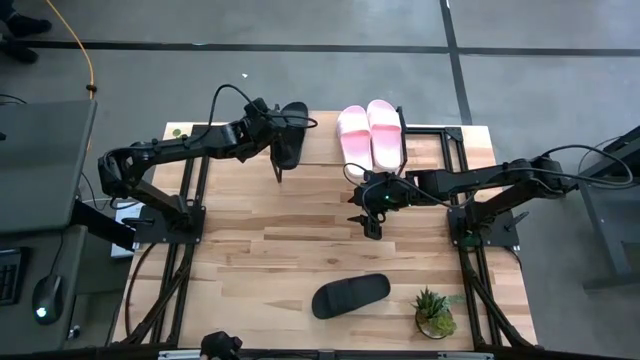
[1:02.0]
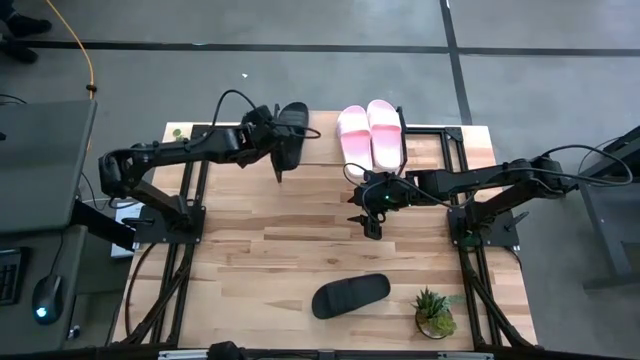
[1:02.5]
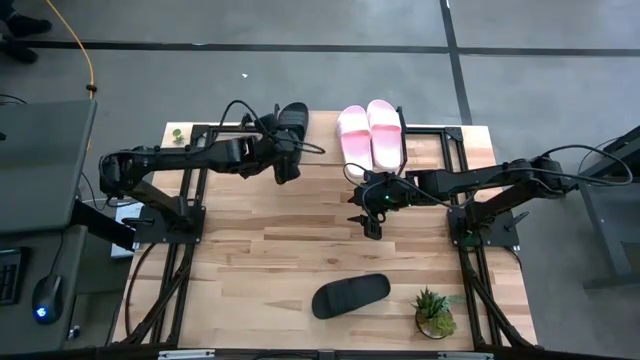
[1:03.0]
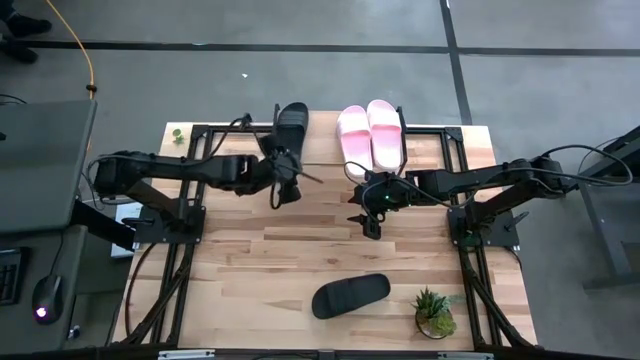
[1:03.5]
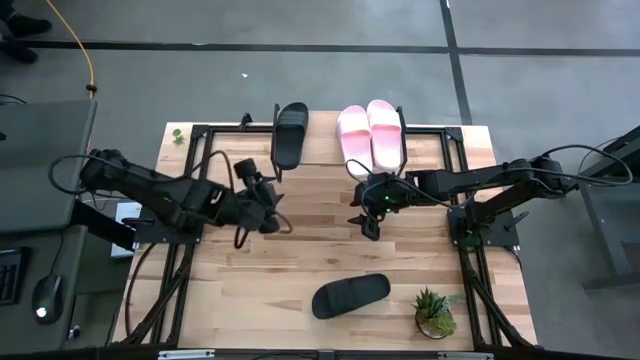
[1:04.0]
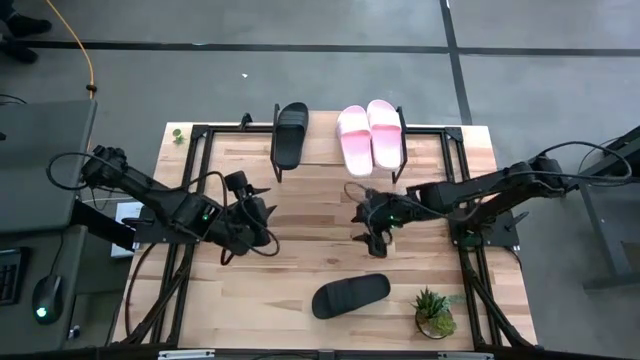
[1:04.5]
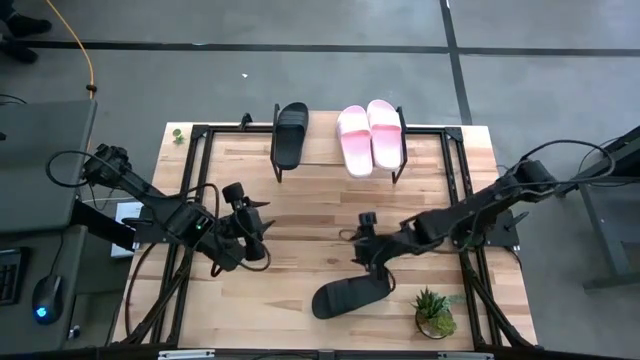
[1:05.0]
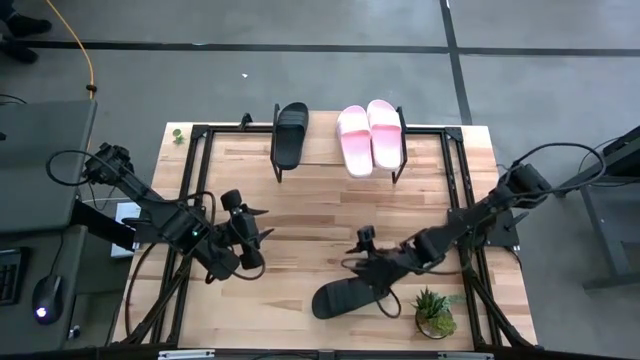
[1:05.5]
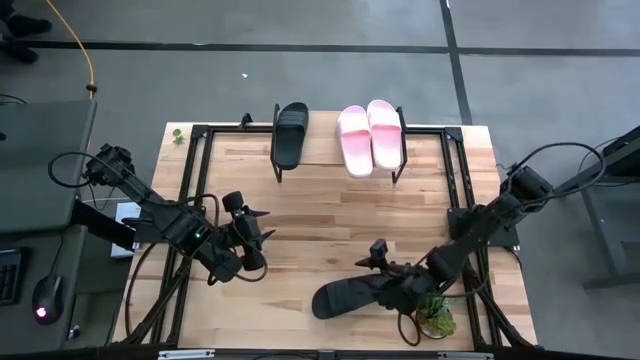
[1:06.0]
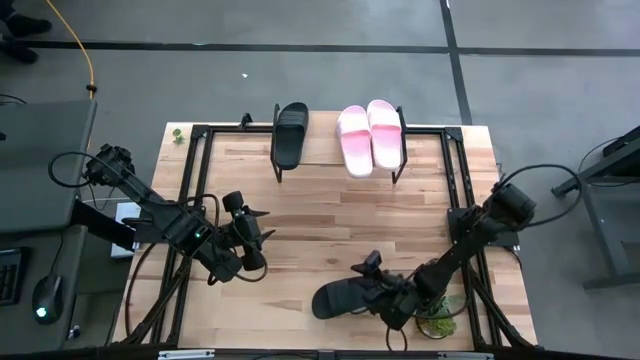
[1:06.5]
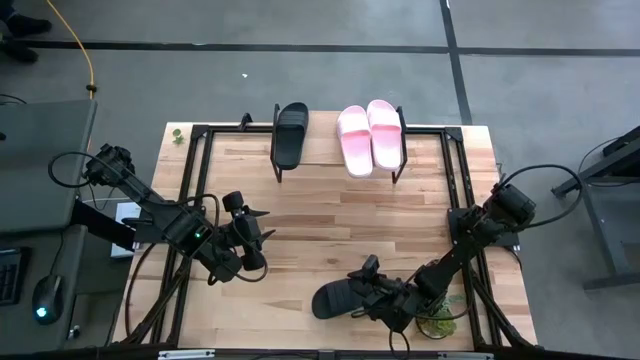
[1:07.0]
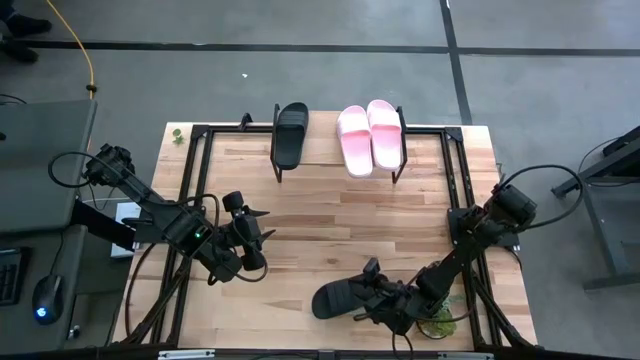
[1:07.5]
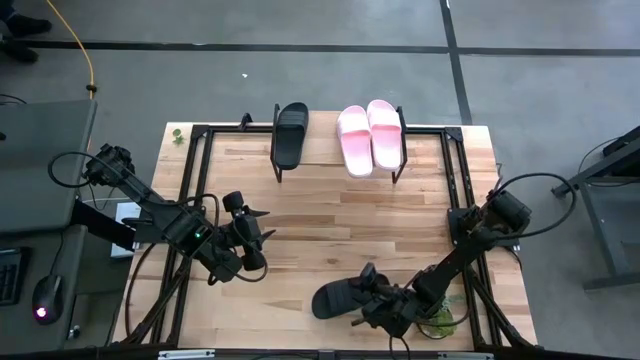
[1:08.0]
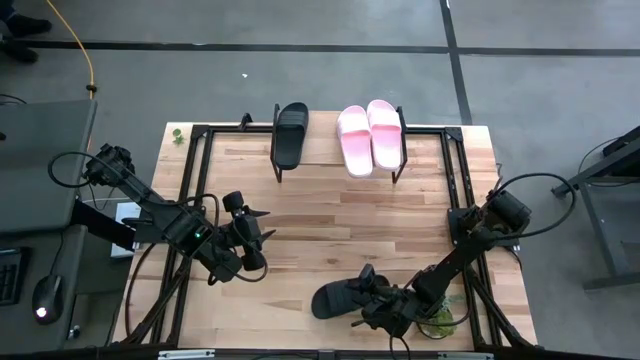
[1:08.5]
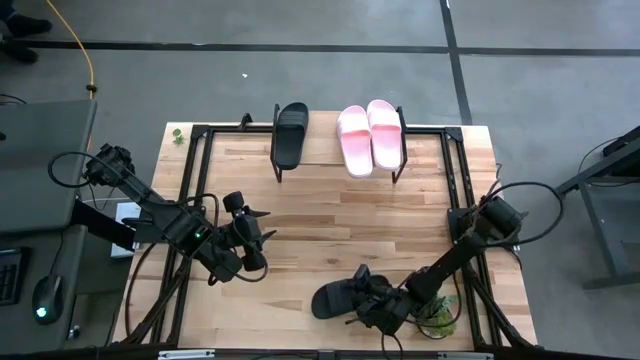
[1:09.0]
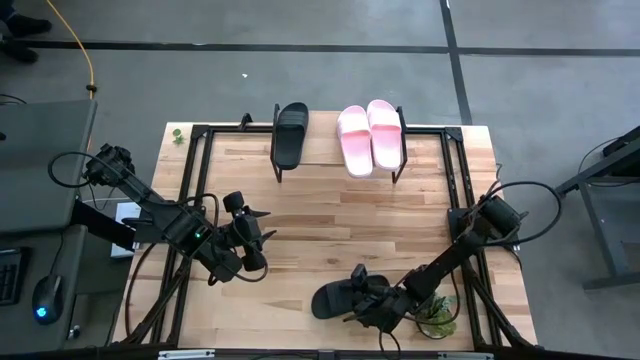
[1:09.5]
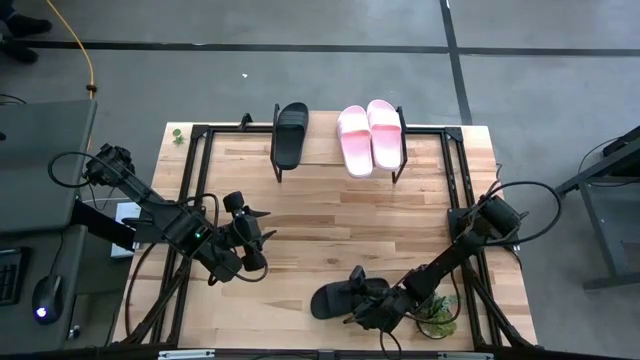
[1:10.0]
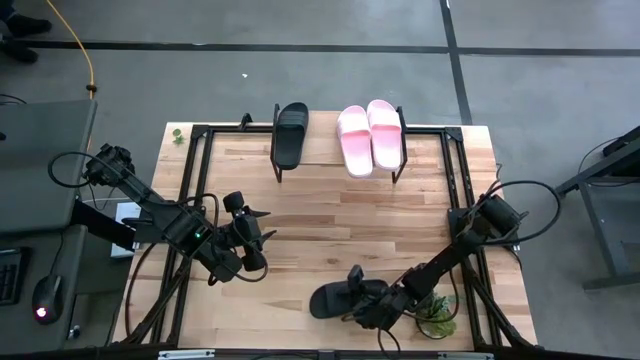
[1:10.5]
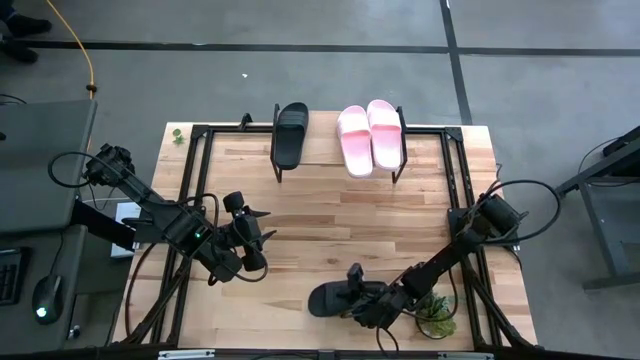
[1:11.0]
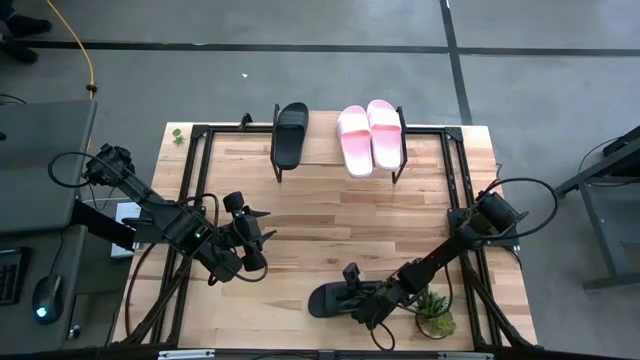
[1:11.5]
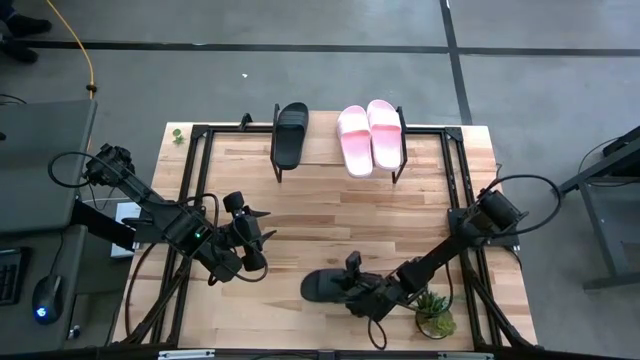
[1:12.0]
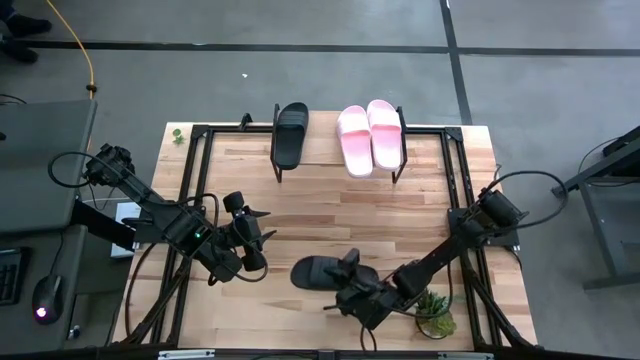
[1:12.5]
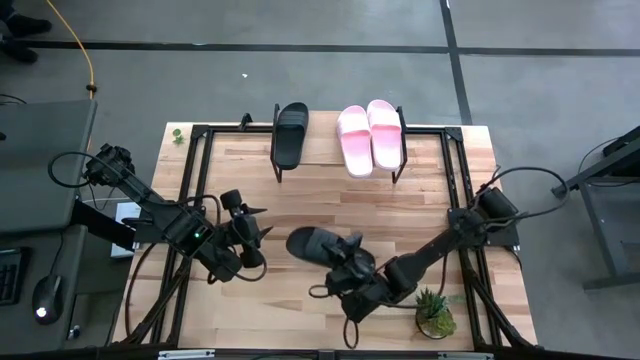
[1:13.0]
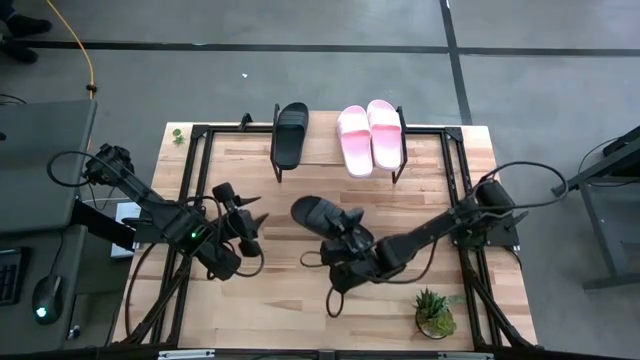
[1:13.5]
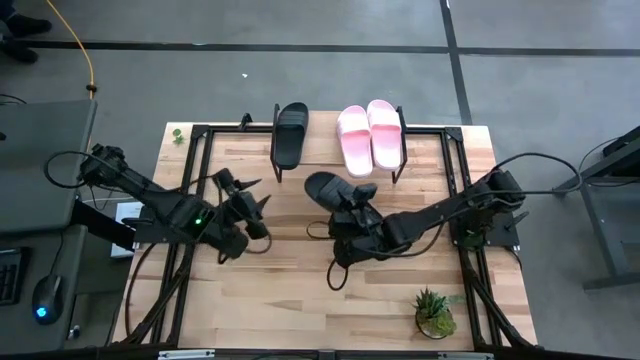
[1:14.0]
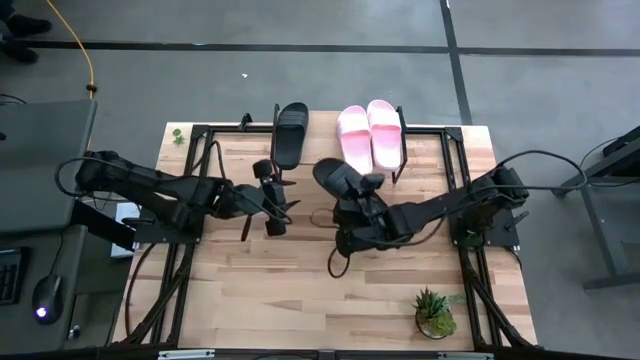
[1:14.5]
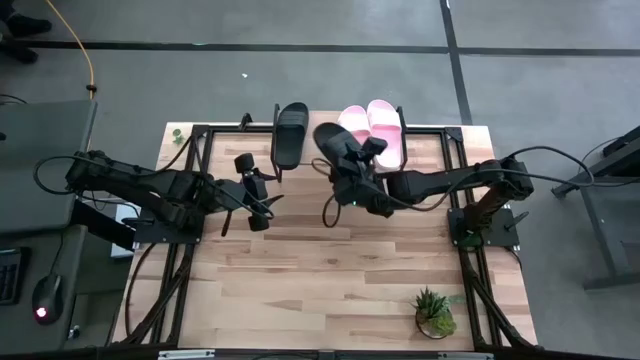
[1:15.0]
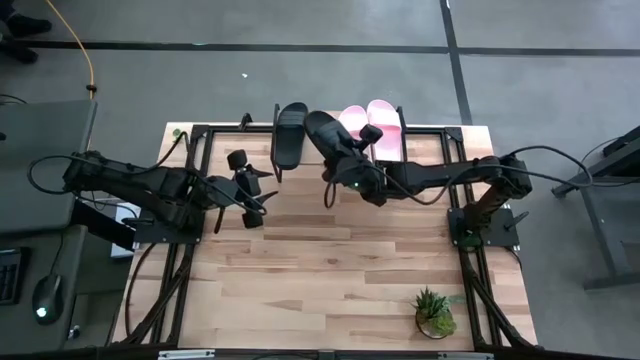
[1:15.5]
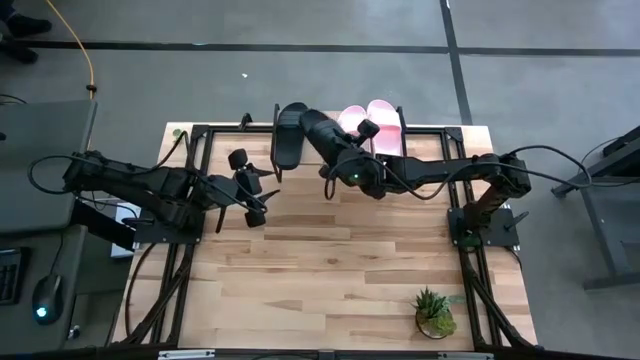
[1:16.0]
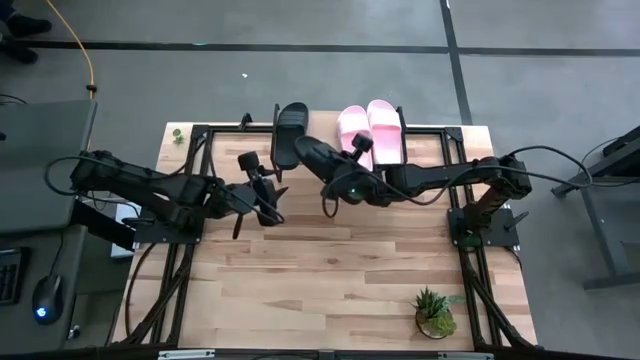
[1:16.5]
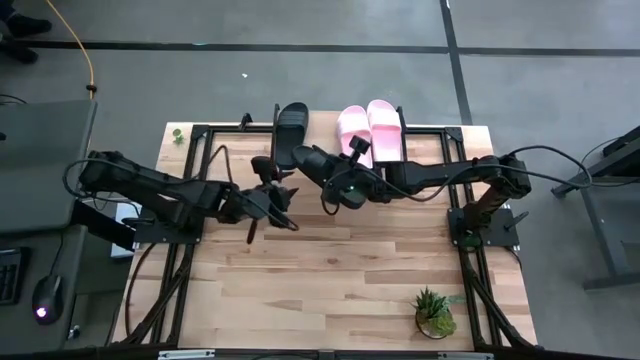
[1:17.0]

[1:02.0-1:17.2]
Task: Pick and place slides into the shelf
Put the black slides on the shelf

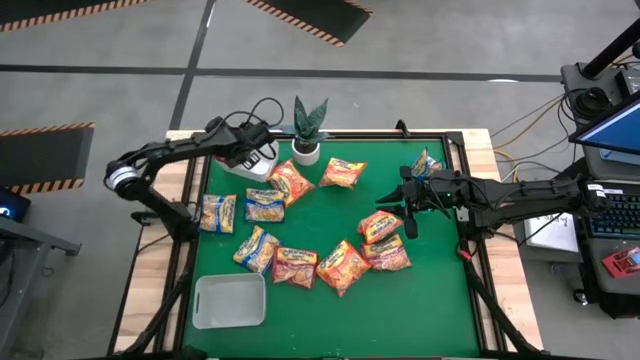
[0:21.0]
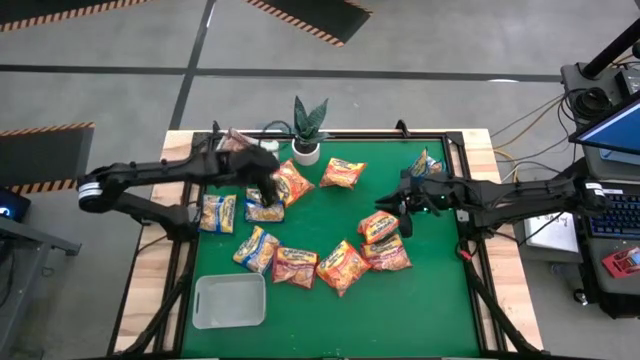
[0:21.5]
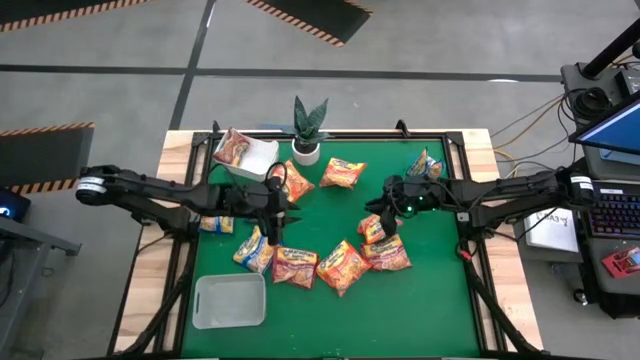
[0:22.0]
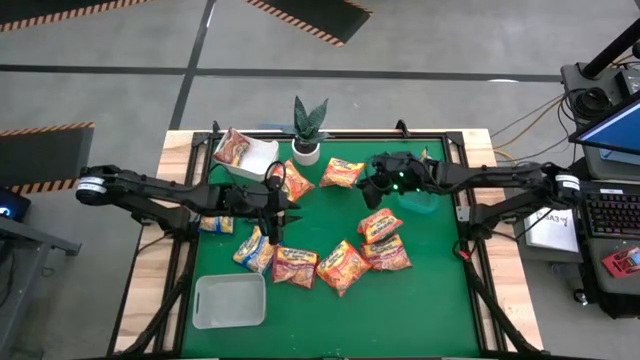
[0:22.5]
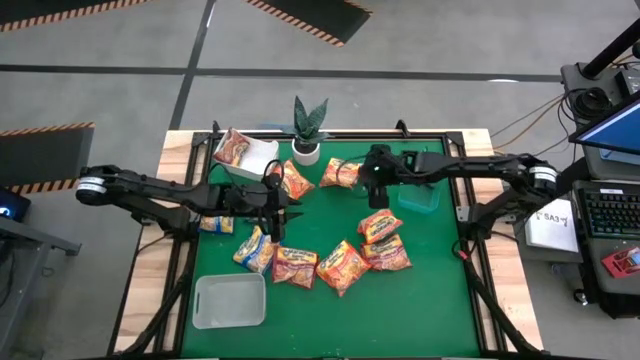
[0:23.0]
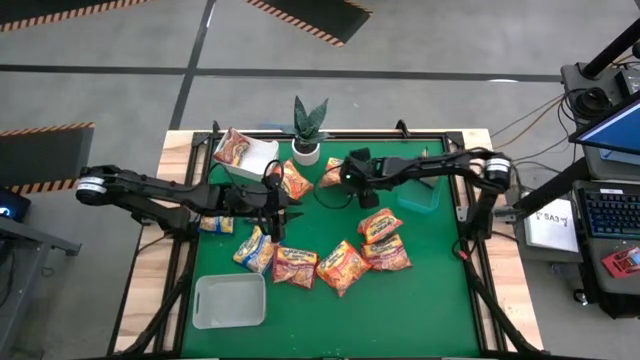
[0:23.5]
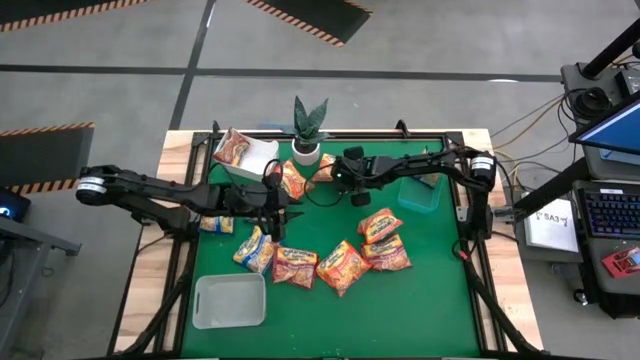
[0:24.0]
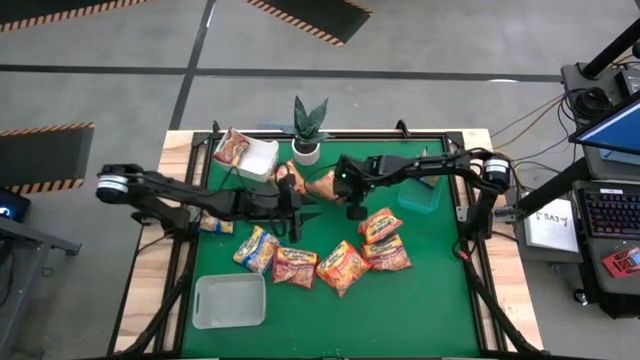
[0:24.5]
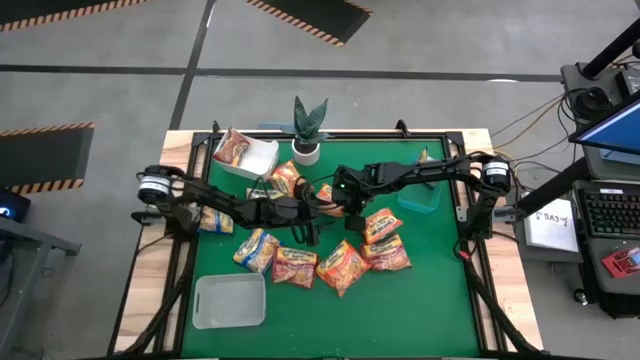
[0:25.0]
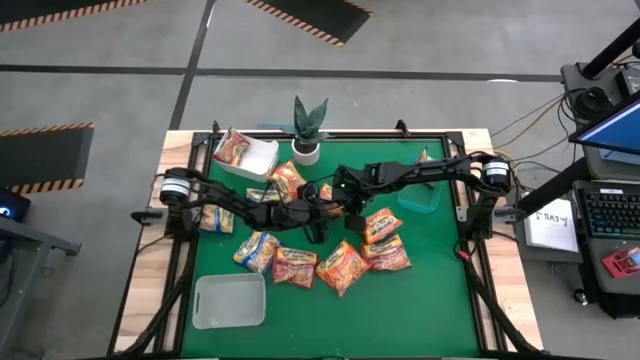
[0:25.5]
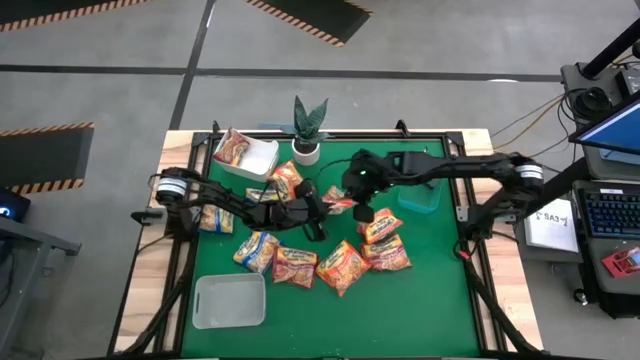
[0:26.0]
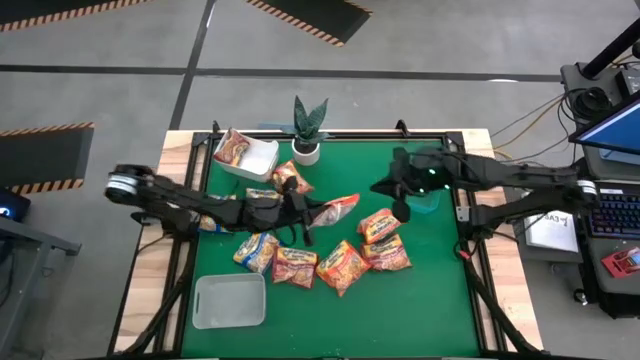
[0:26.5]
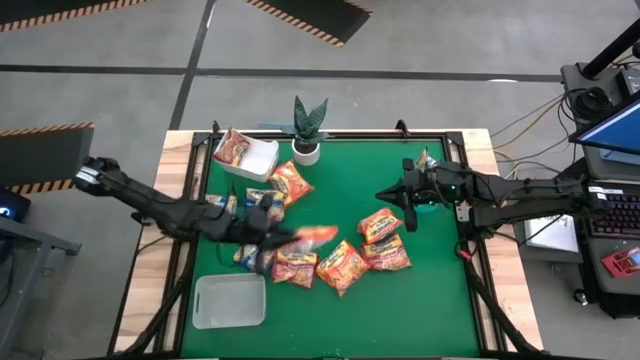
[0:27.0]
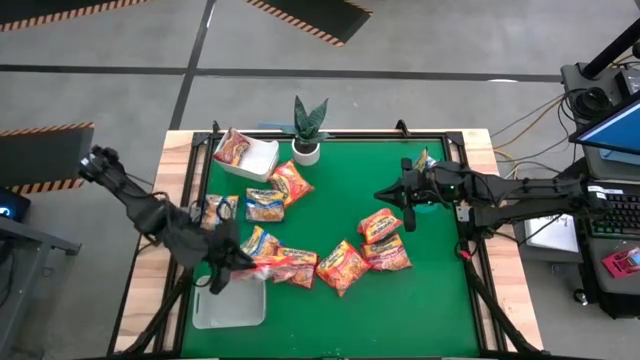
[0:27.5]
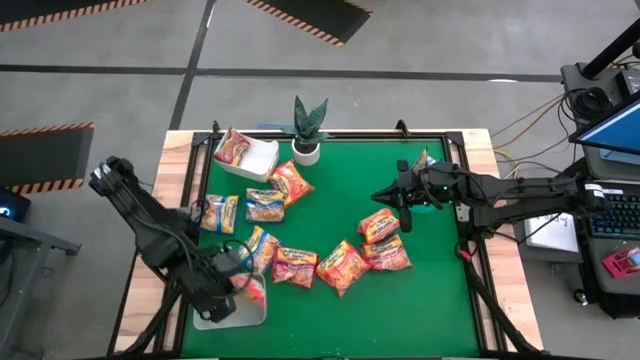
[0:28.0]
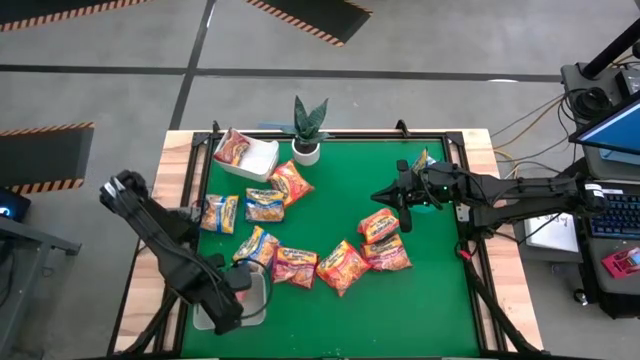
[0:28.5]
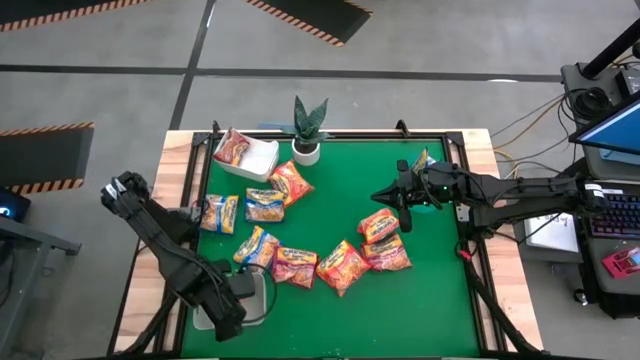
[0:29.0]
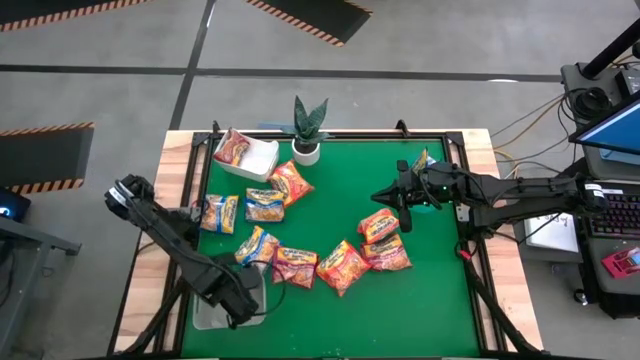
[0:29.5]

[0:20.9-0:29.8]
Task: Sort Maruchan noodles
Put the orange noodle pack into the gray bin
